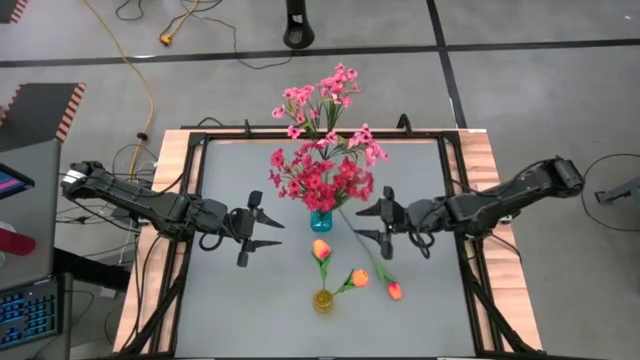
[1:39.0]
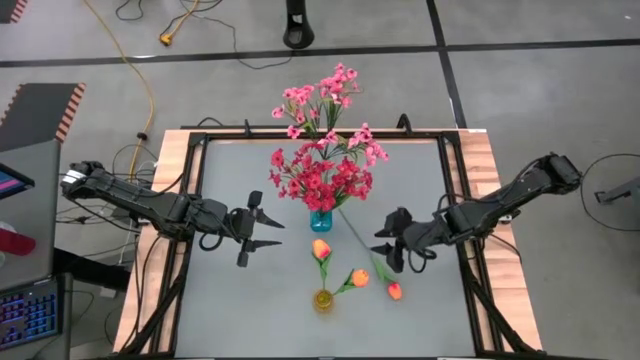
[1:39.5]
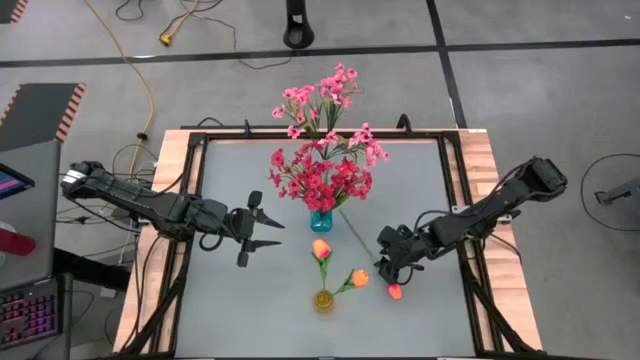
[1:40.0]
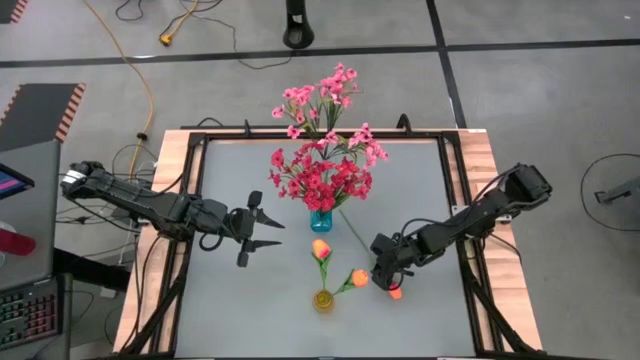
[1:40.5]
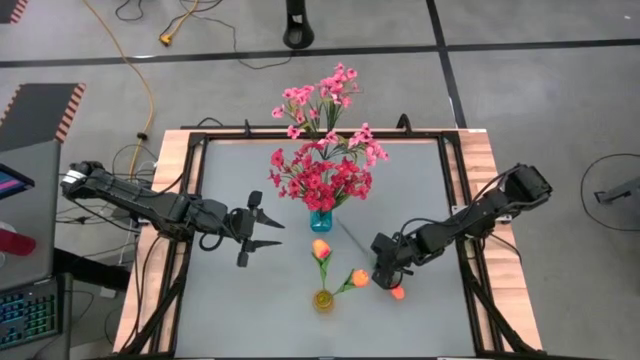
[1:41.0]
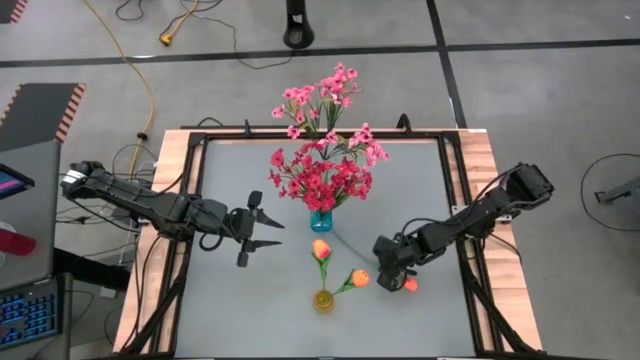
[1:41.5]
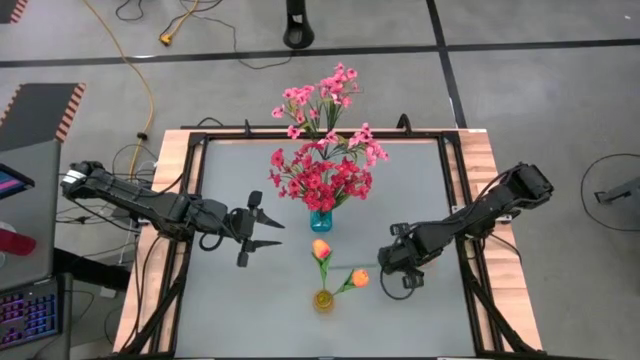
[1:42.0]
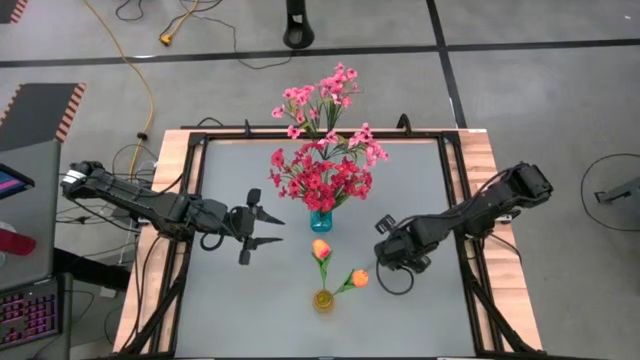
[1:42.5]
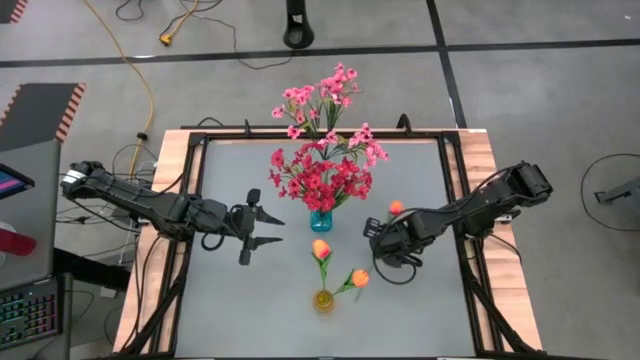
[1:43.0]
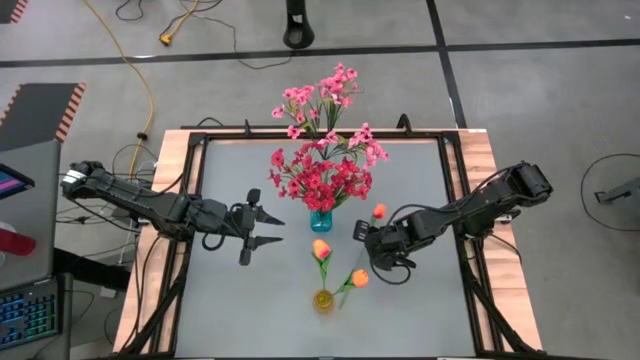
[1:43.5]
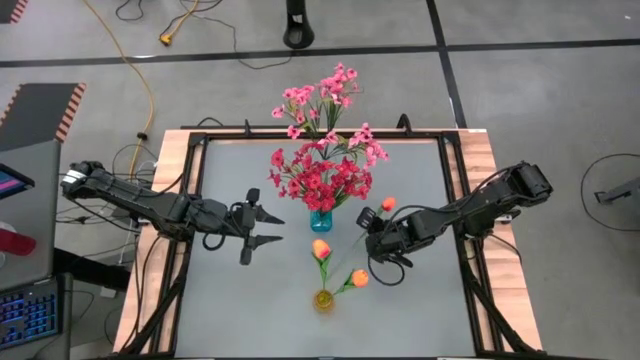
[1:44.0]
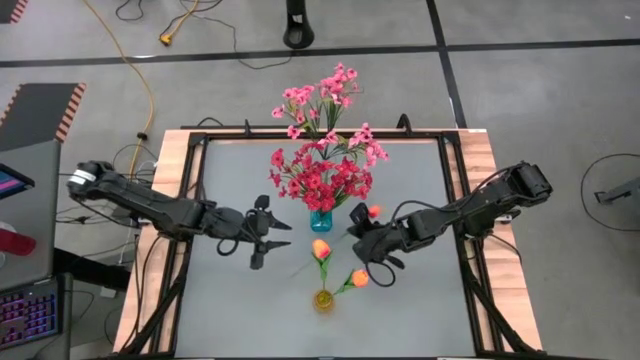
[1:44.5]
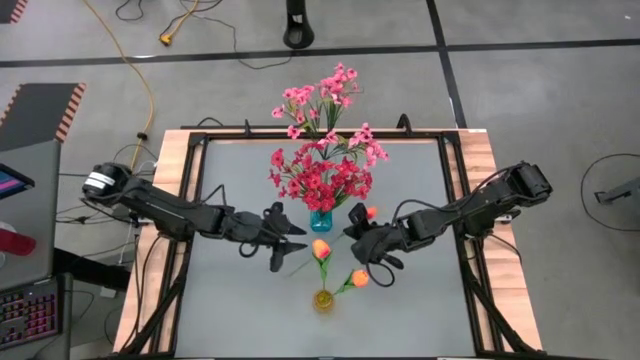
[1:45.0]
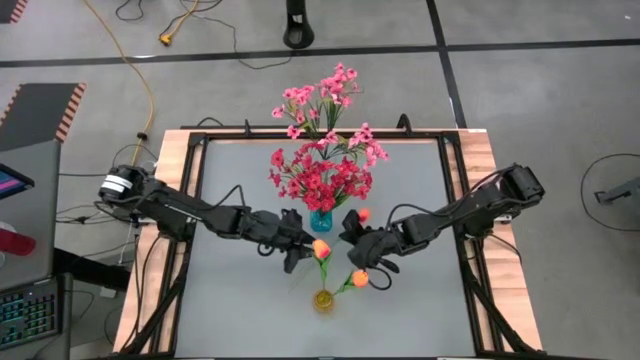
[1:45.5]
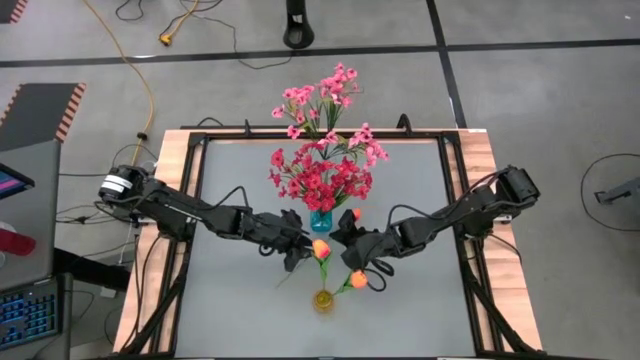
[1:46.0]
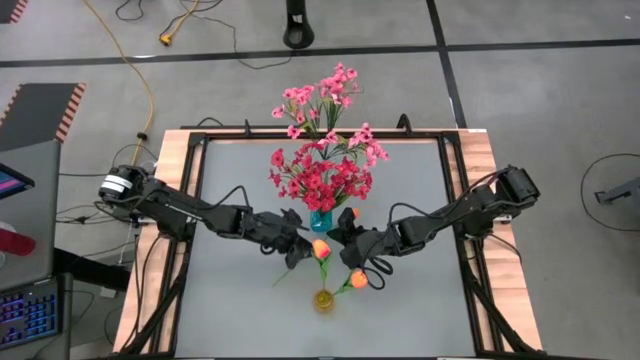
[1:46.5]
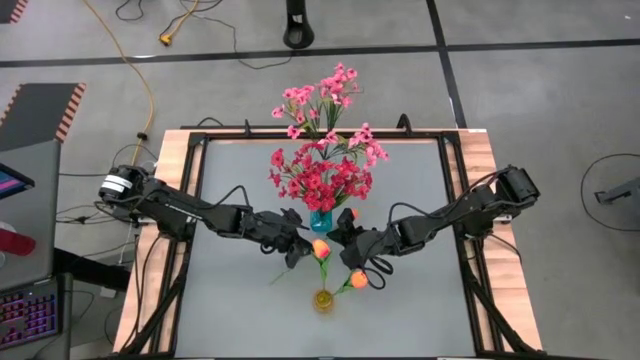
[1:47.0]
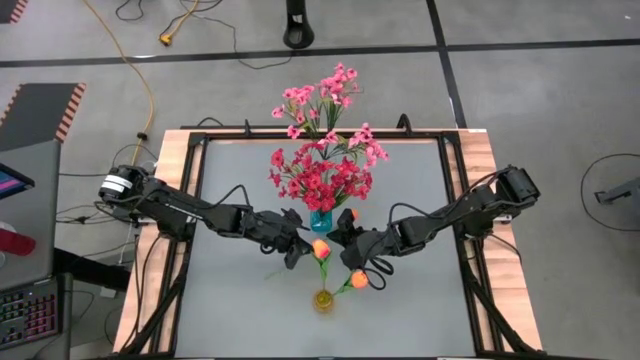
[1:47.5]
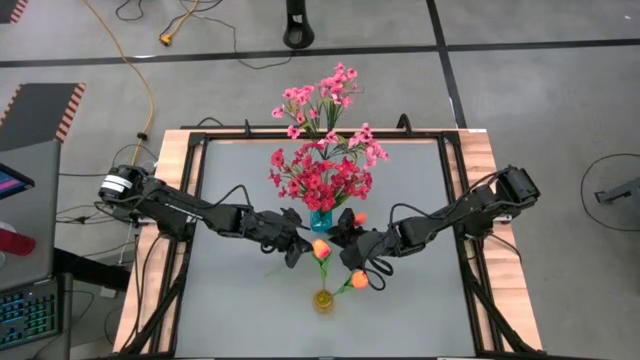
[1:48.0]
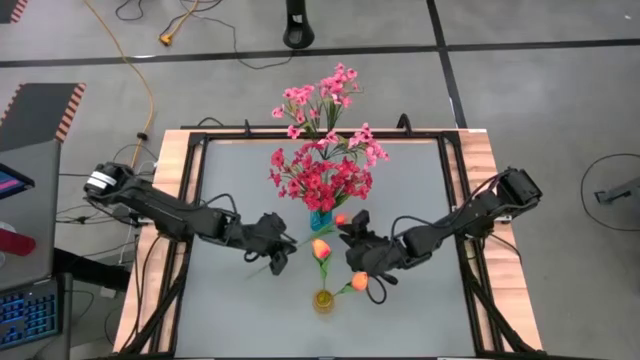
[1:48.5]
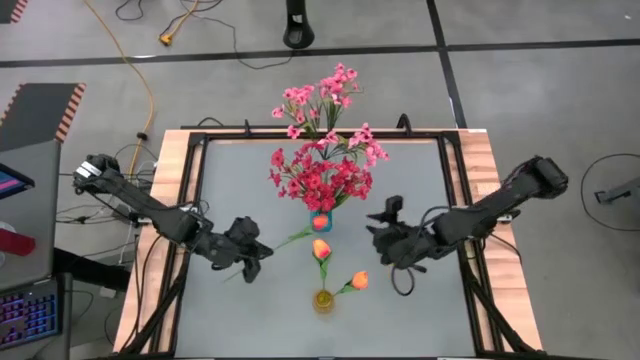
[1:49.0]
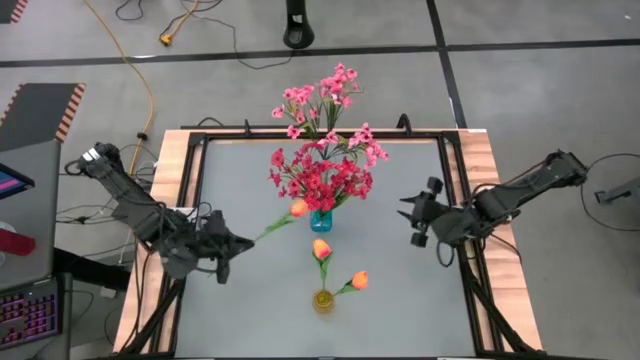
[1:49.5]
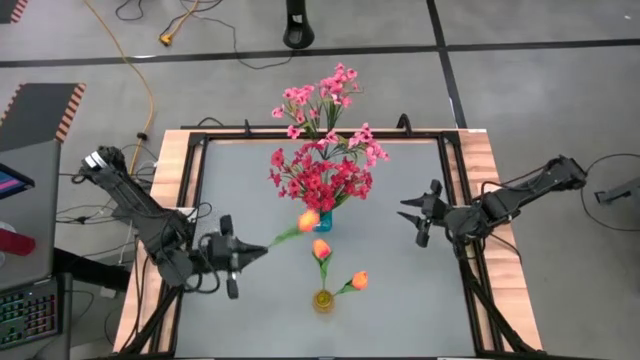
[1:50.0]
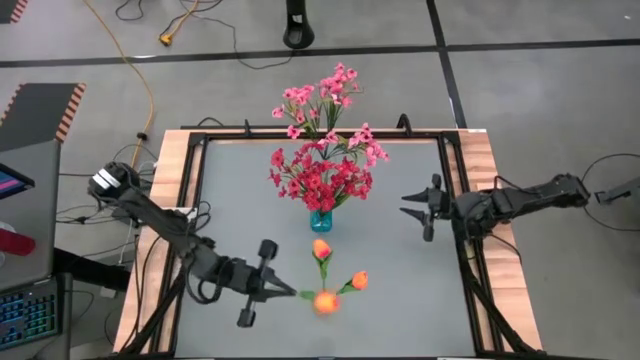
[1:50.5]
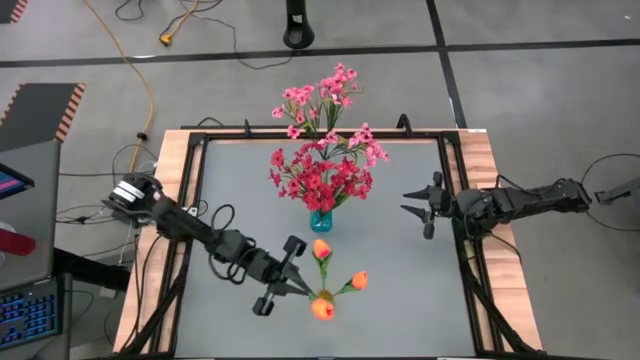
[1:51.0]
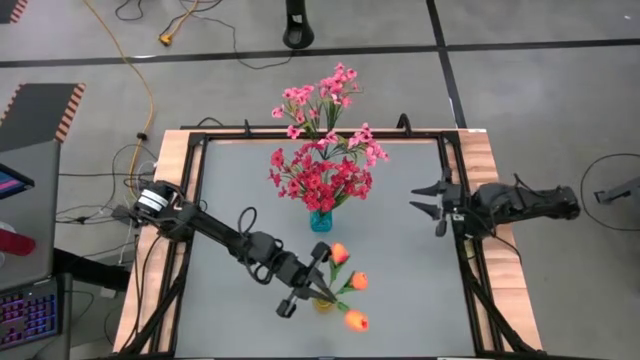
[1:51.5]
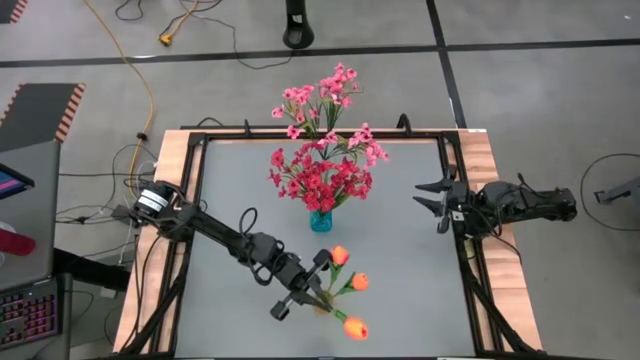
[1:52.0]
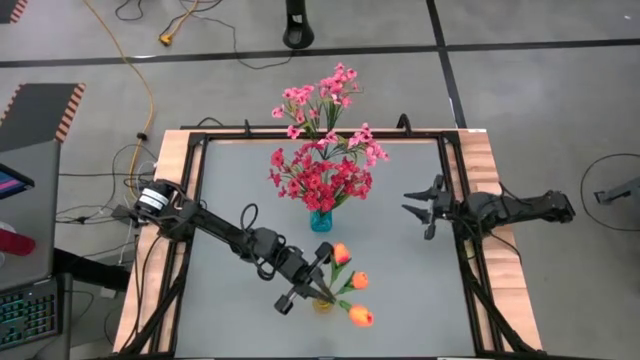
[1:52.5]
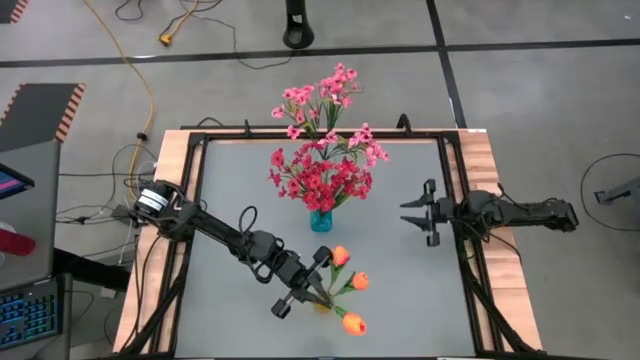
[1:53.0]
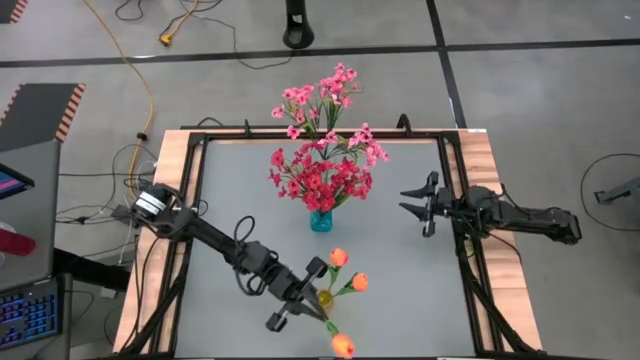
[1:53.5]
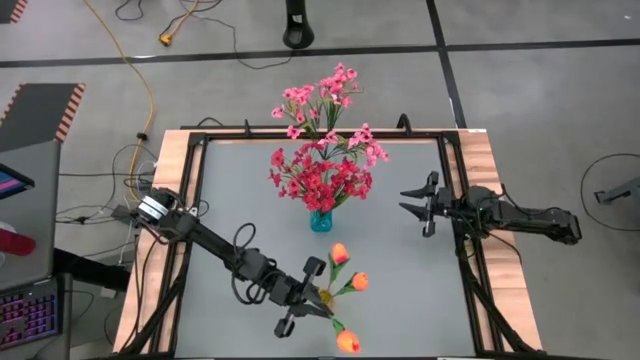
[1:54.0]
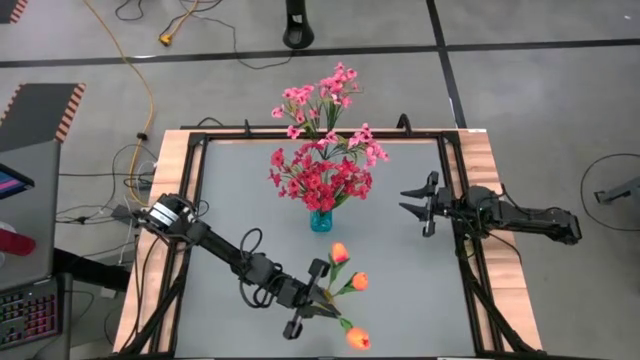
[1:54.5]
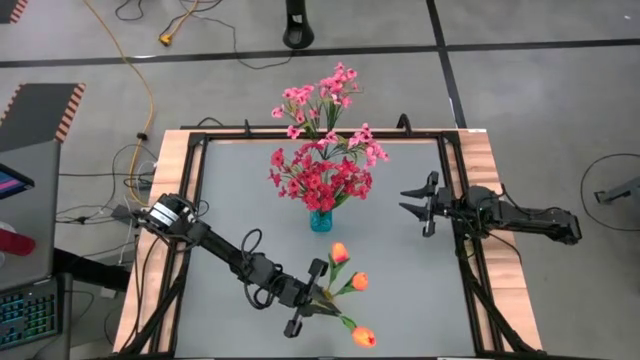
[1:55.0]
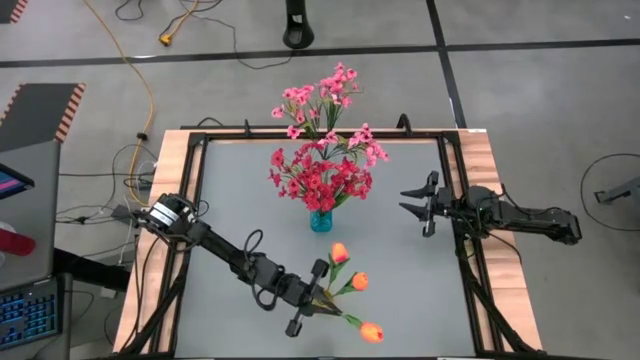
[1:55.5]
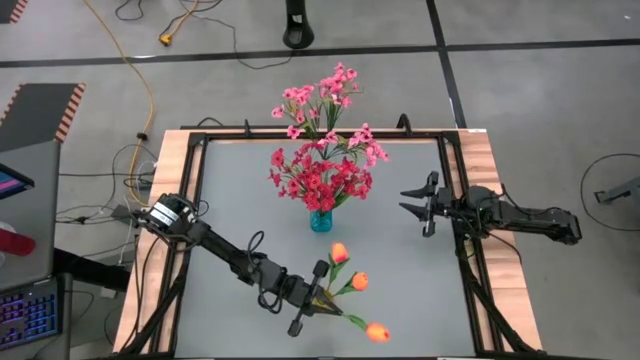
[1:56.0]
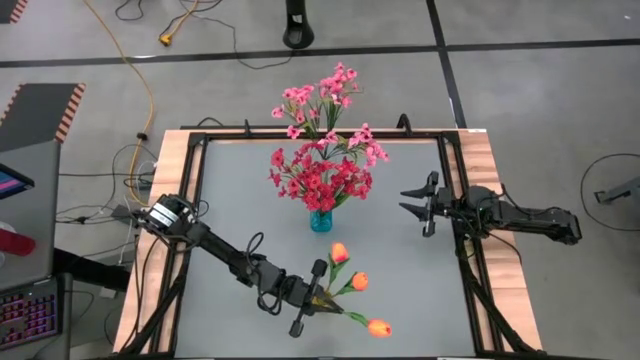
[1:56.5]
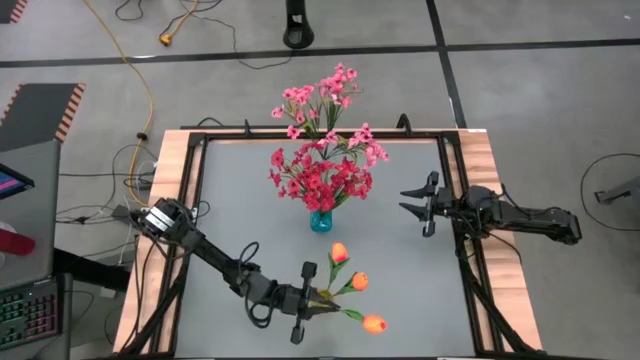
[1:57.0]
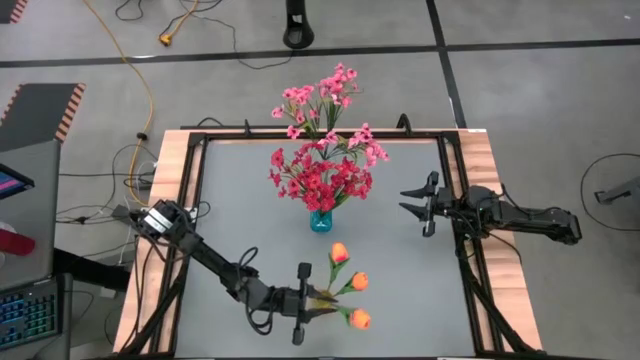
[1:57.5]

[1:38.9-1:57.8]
Task: Sort flowers into vase by color
Put the orange flower into the yellow vase

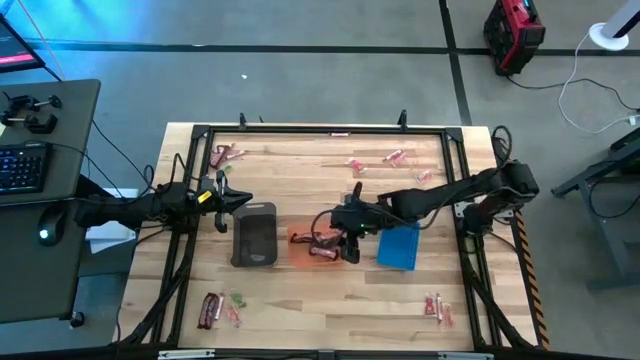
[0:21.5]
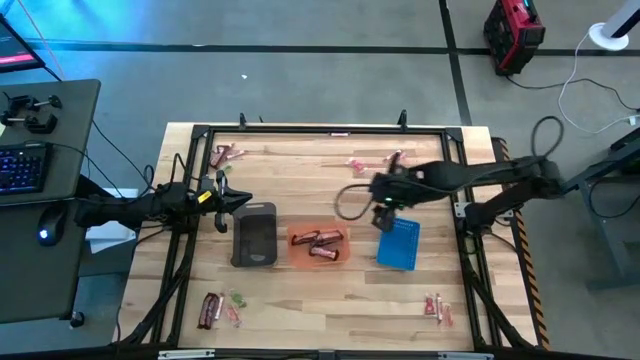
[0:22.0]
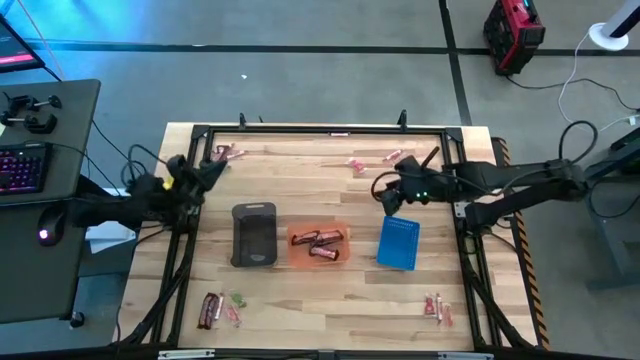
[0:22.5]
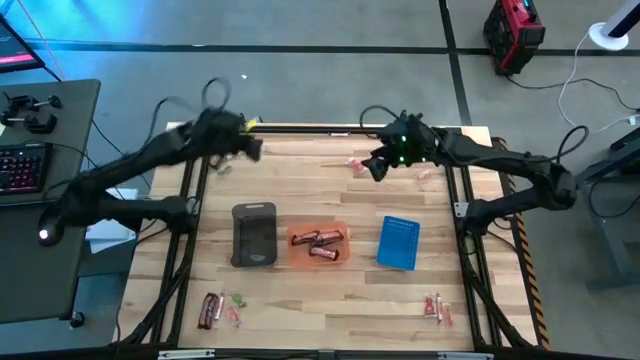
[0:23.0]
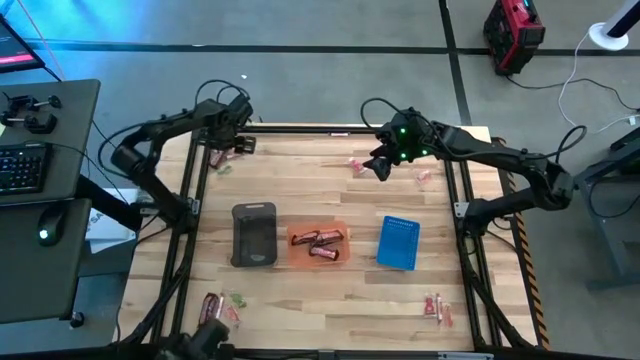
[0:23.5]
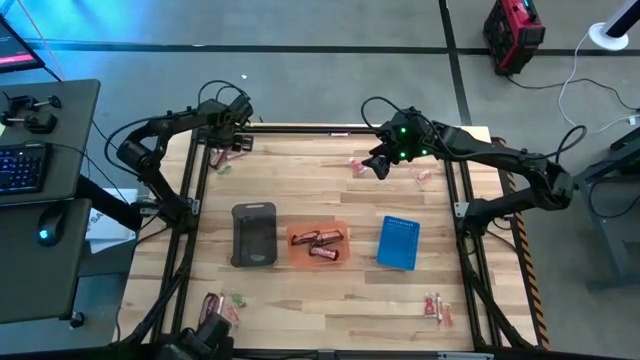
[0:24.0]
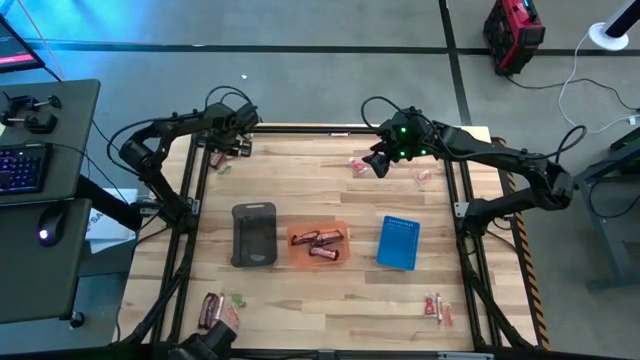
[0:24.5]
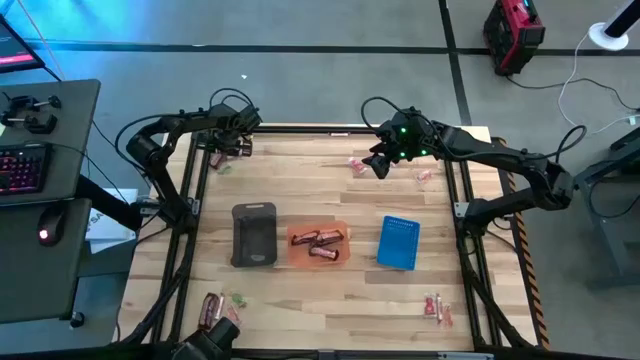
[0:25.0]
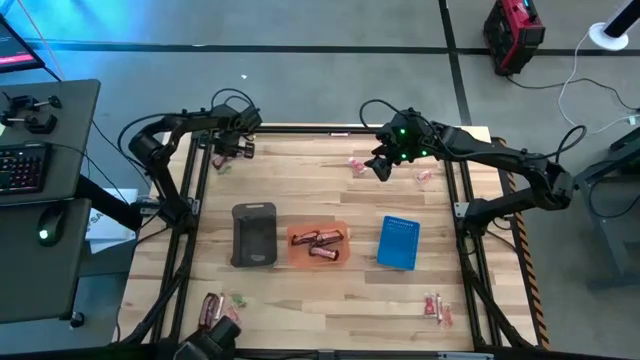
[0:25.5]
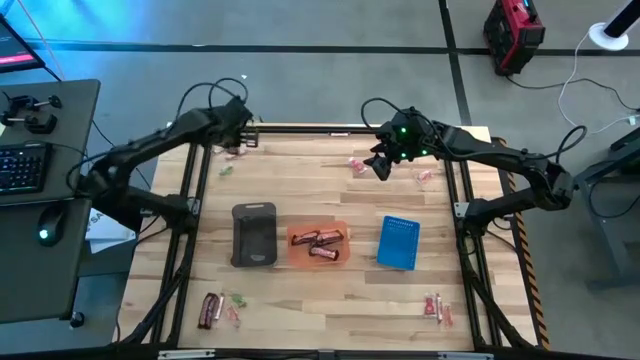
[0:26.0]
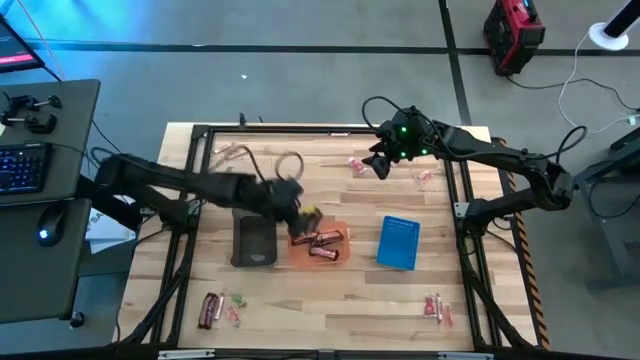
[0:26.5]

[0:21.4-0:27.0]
Task: Sort candy by brand, put in halloween buckets
Put the brown chocolate into the orange bin
